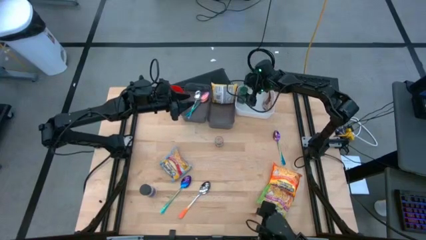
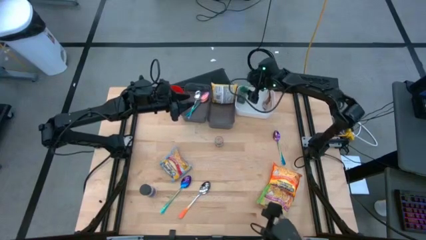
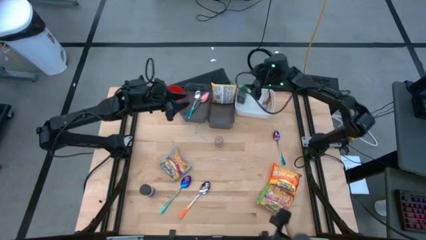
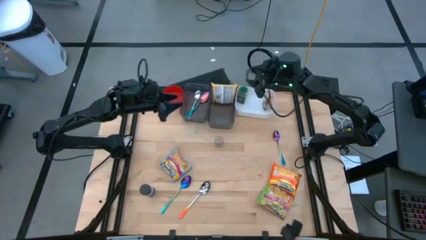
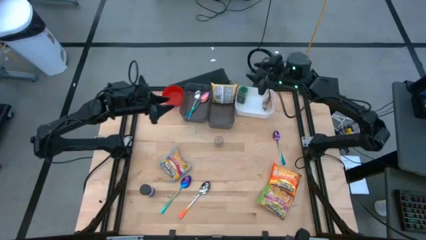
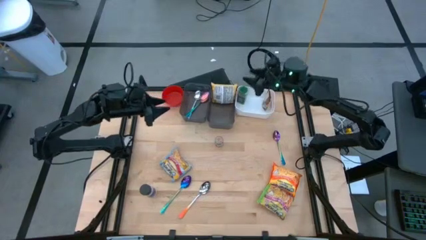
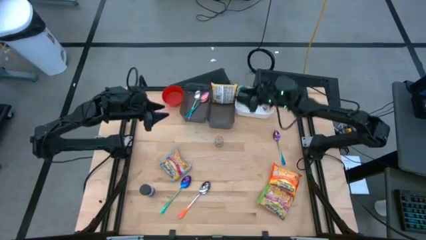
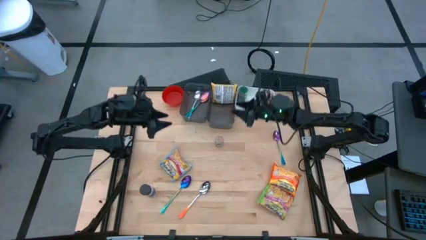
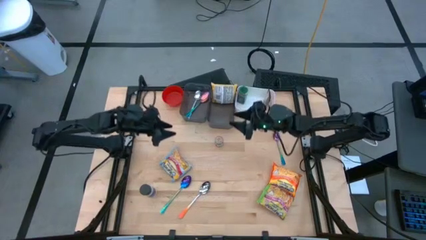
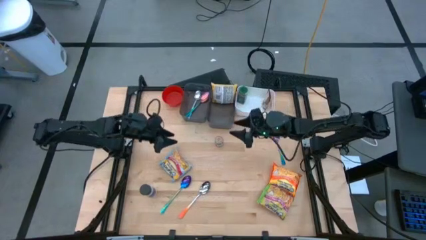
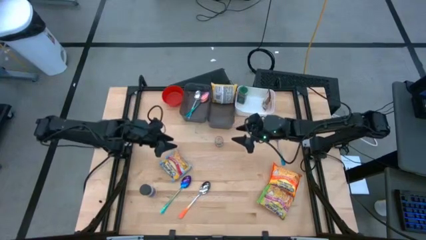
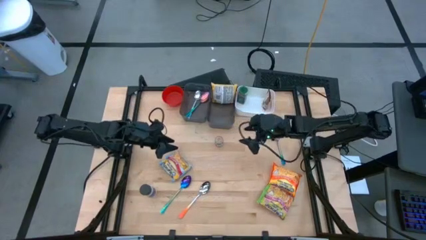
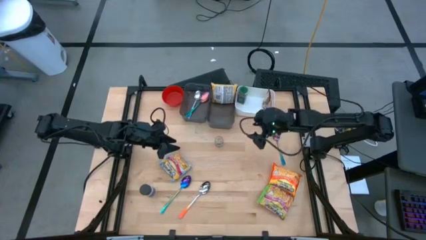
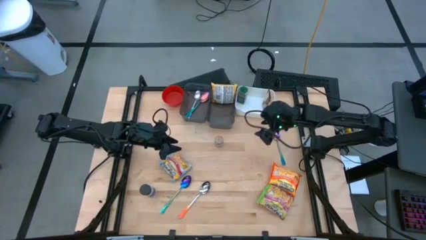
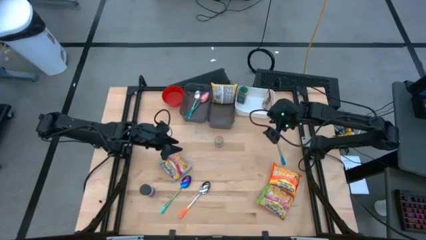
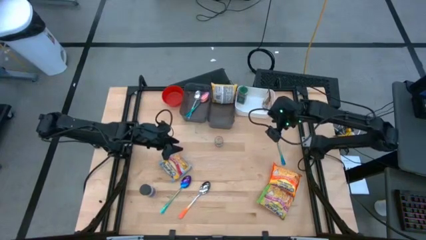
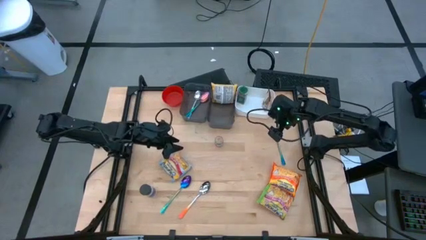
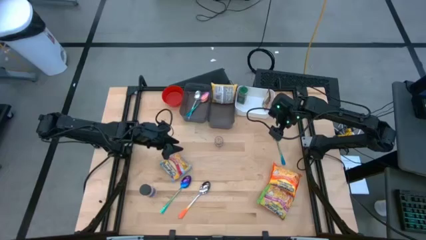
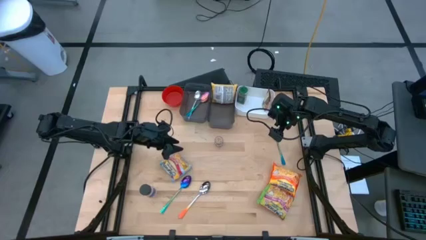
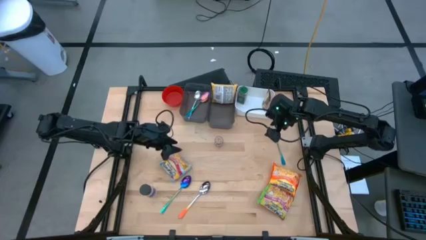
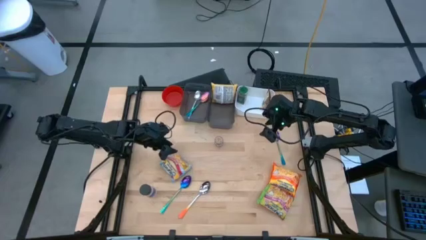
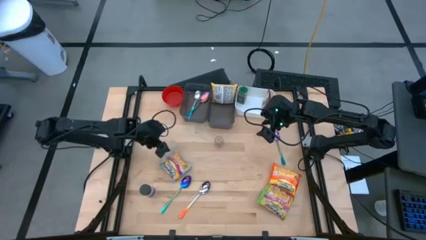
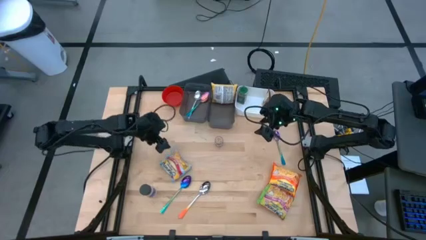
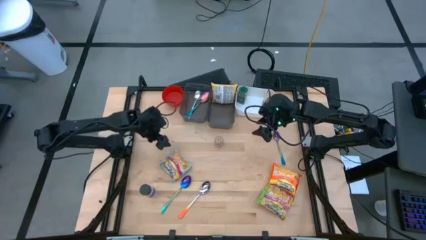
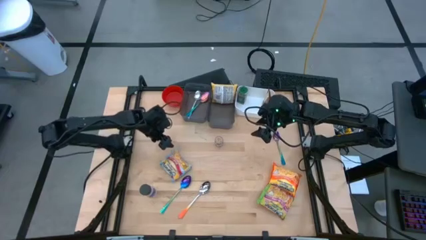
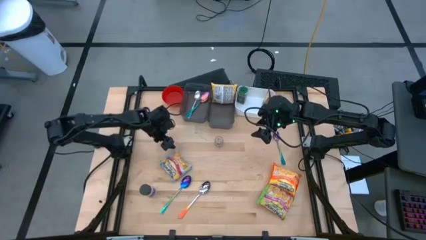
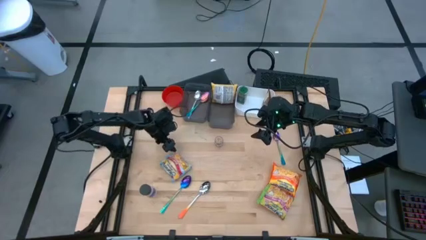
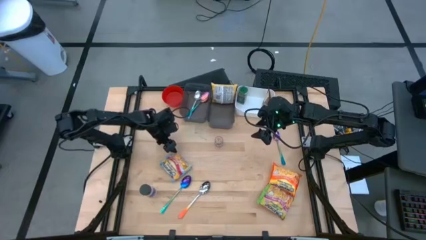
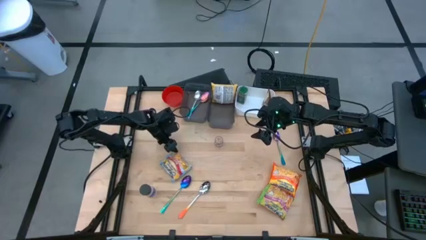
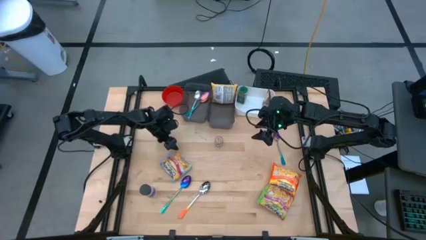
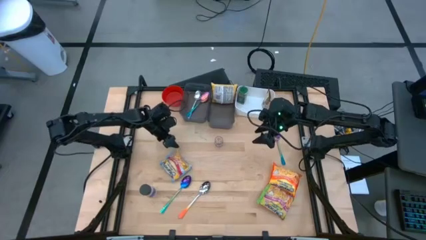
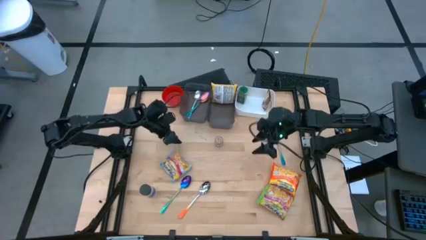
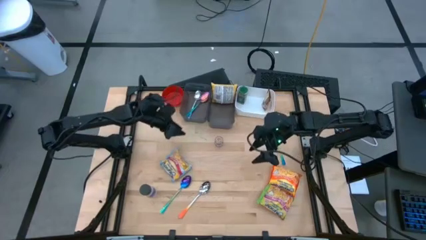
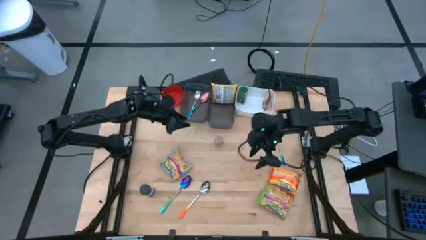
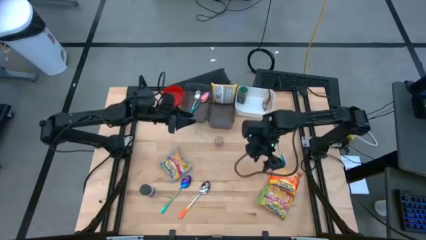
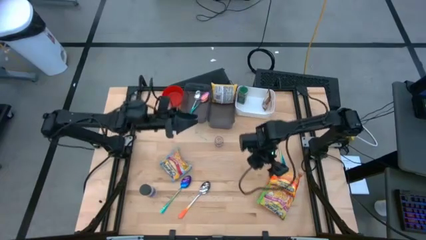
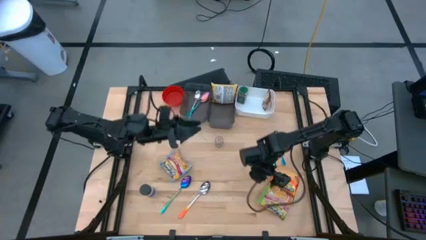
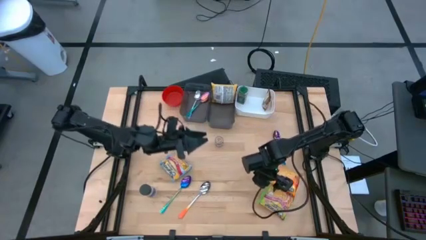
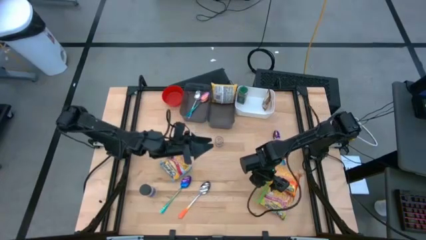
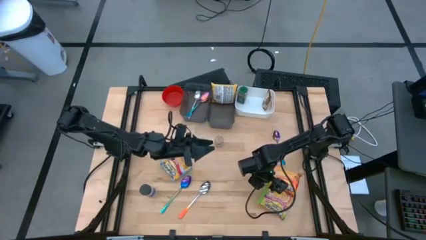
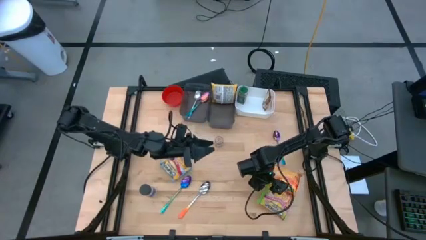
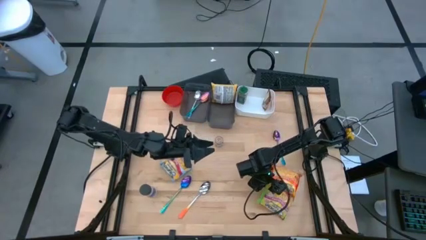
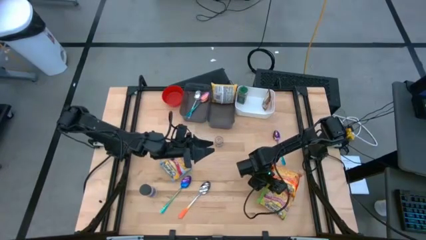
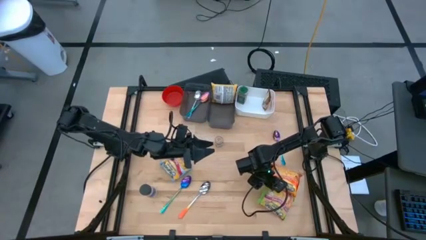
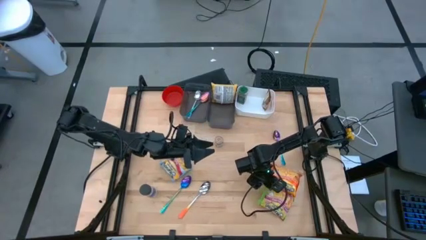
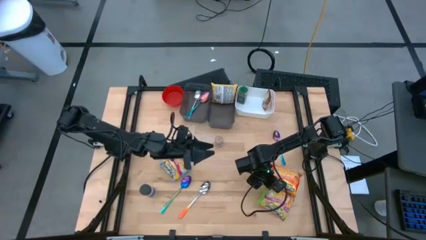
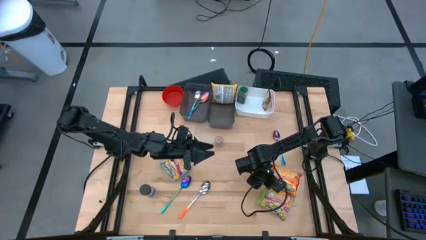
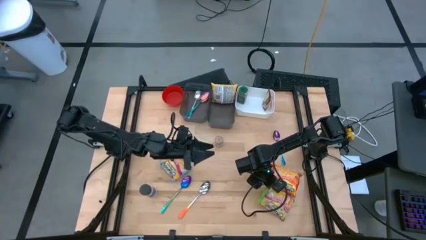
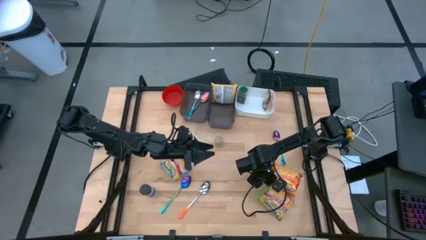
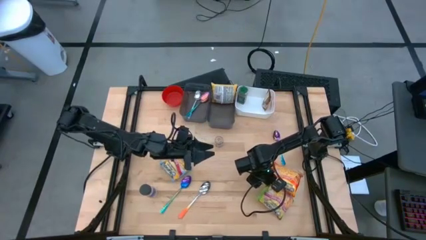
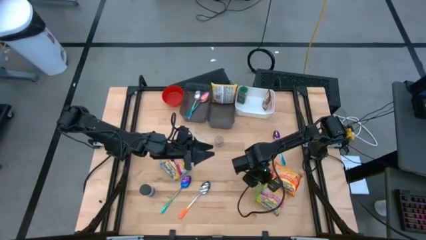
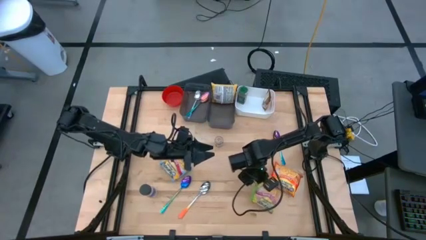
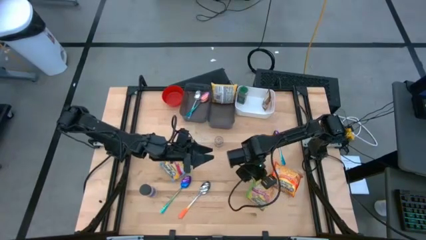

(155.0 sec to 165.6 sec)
Task: Pick & Place Food Item
Put the green noodle pack into the right black bin

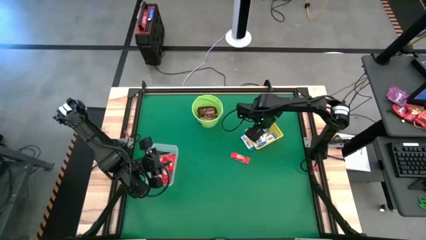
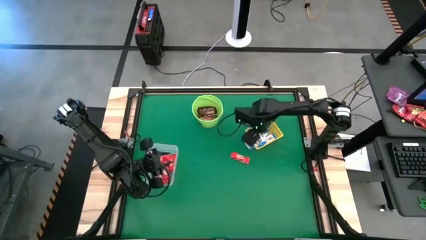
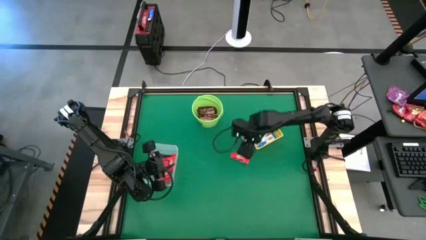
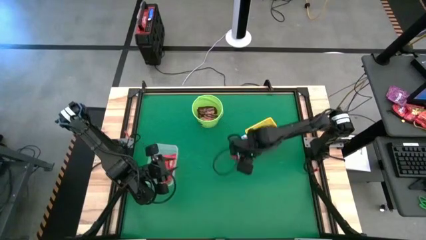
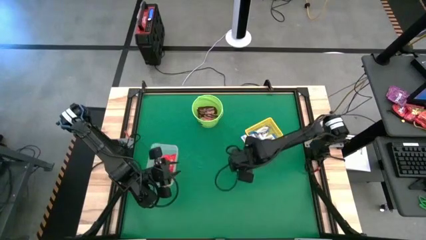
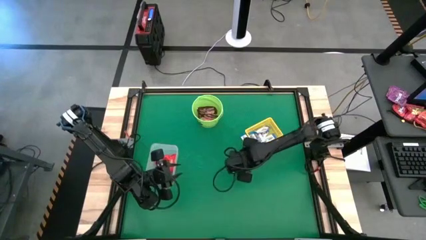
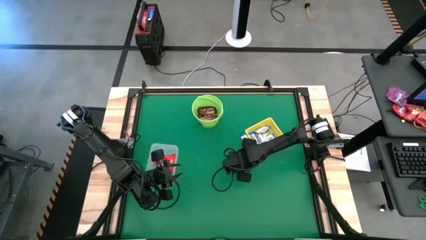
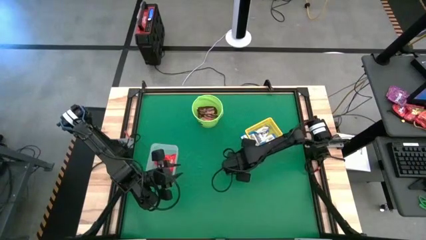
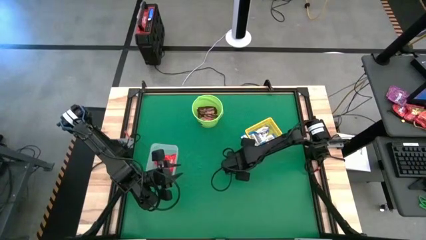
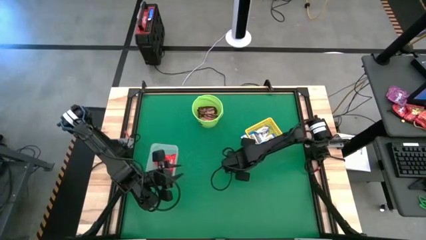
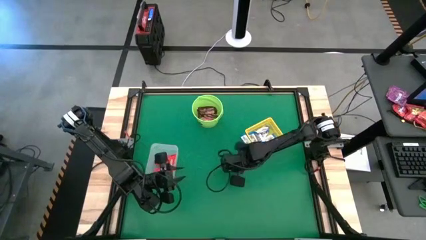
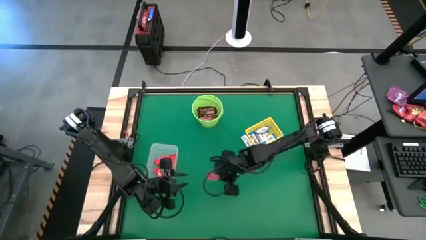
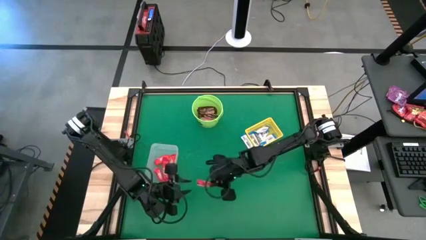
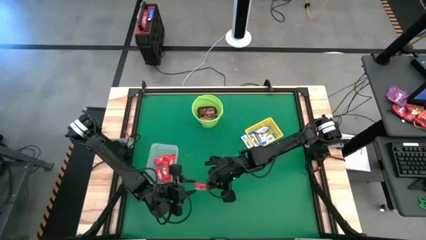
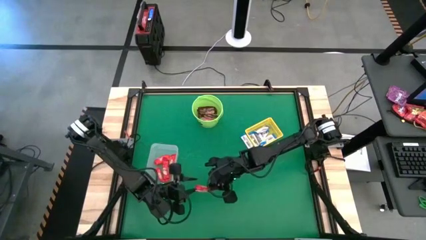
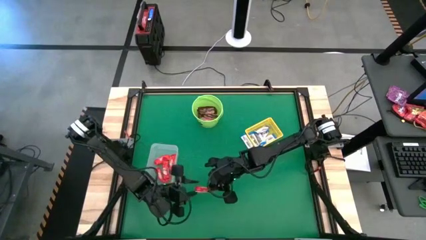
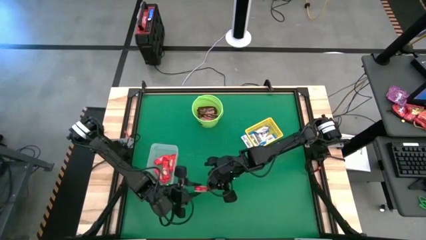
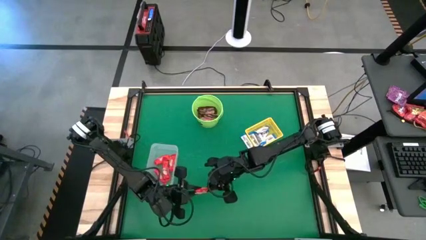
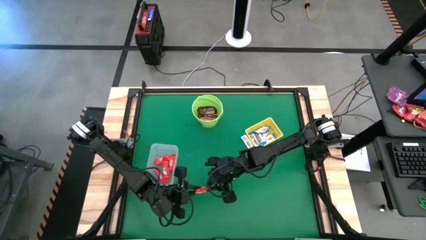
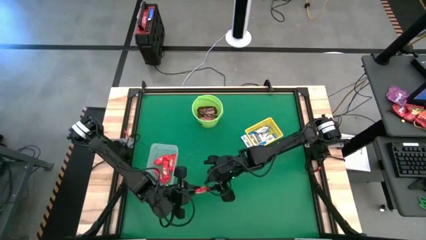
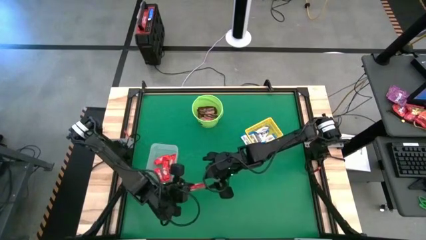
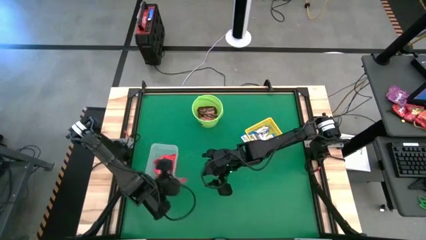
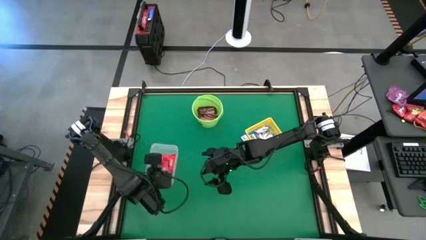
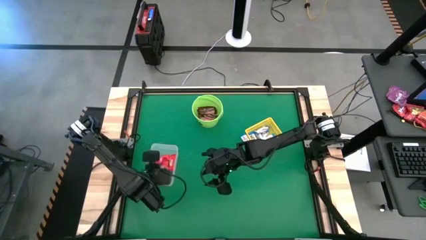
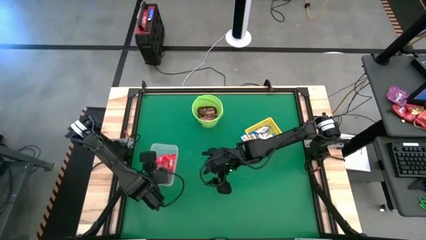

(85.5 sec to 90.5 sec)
Task: Sort candy by brand, put in halloween buckets
Put the red chocolate bar into the transparent bin

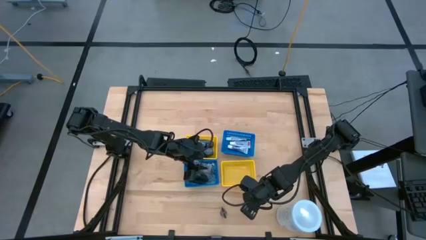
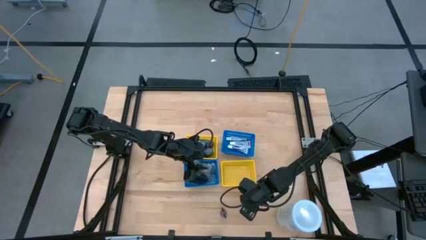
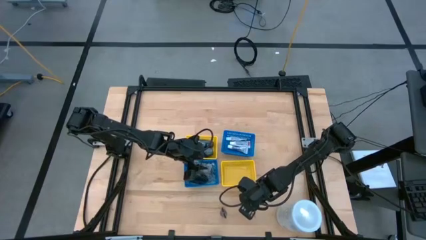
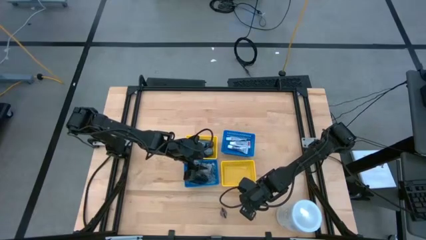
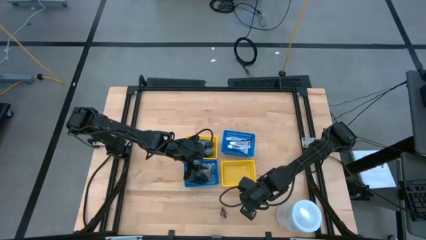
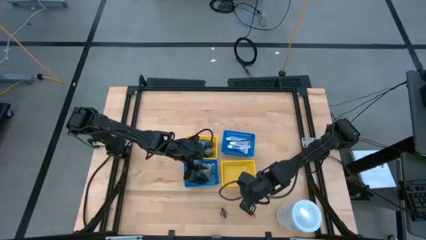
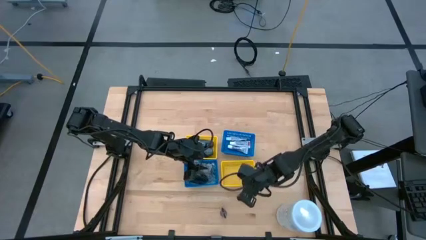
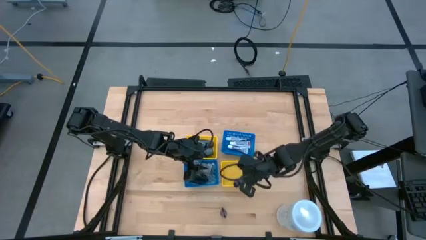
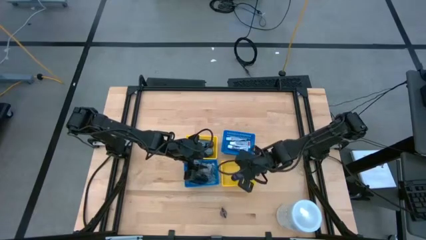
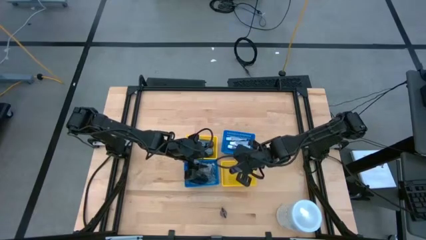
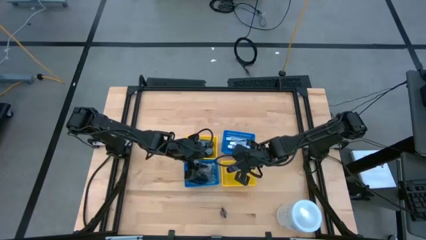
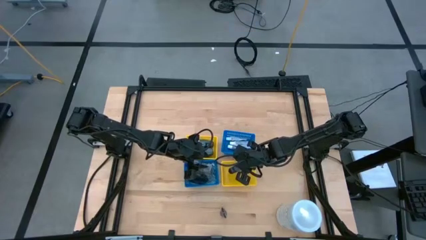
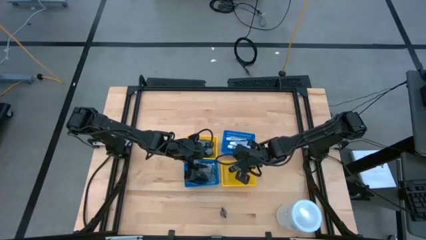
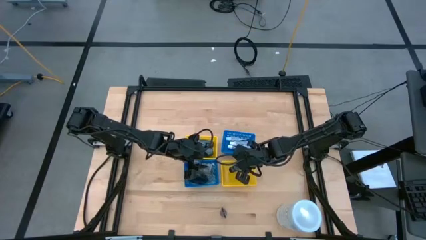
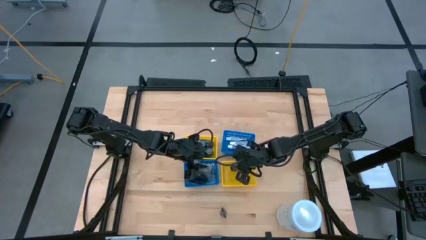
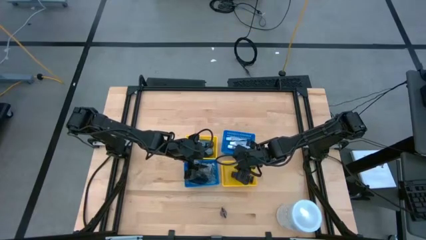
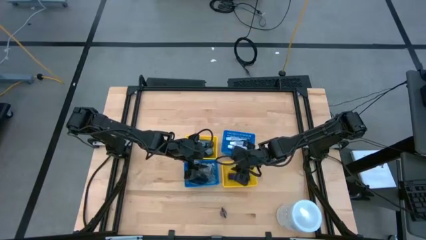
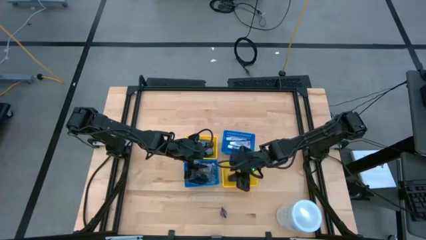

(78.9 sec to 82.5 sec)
Task: Pick & Place Travel size toiletries
Put the right shaving cream into the bottom right yellow bin
